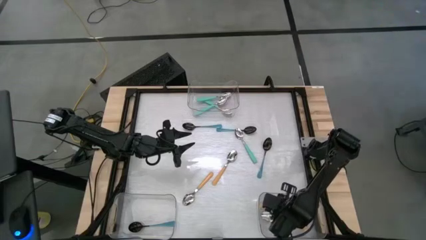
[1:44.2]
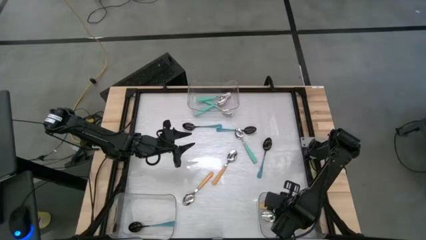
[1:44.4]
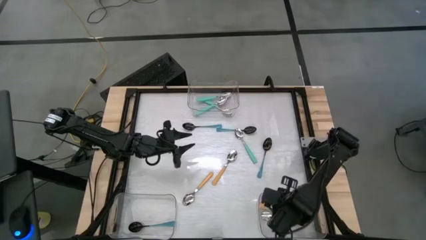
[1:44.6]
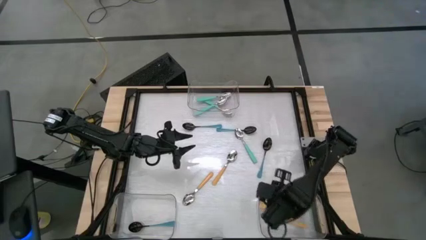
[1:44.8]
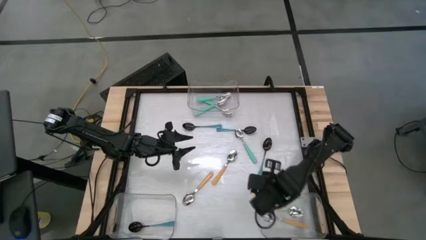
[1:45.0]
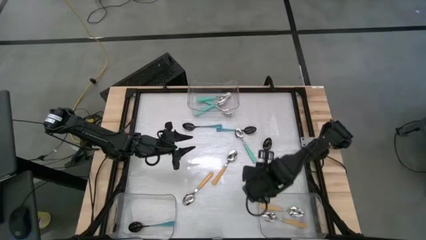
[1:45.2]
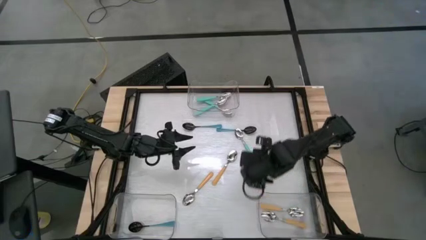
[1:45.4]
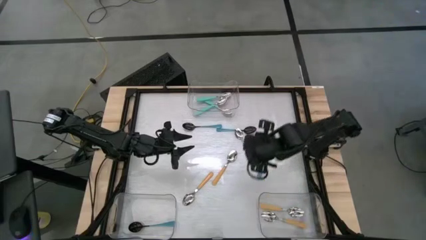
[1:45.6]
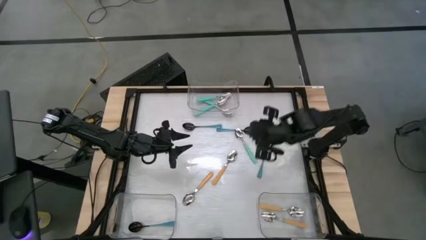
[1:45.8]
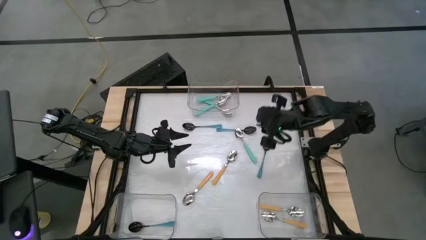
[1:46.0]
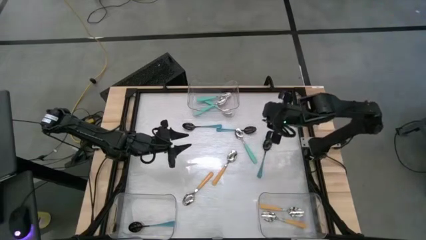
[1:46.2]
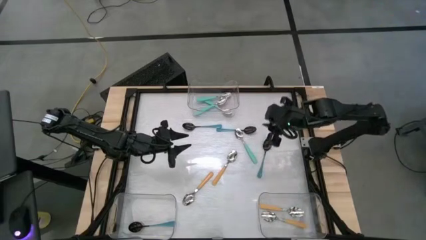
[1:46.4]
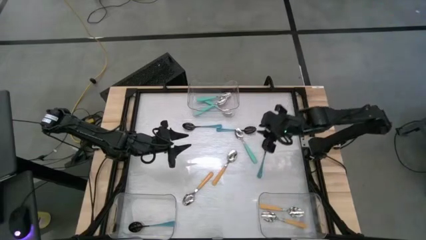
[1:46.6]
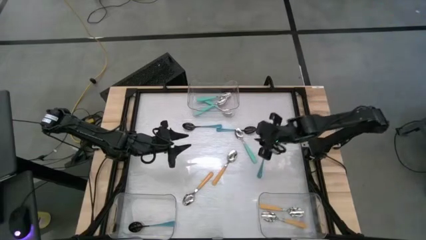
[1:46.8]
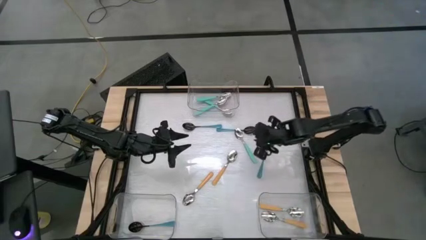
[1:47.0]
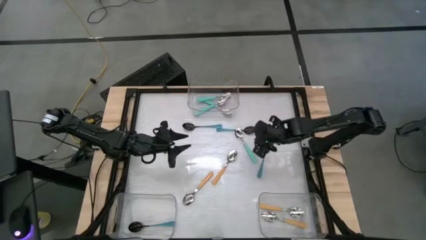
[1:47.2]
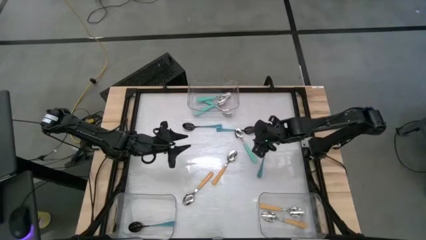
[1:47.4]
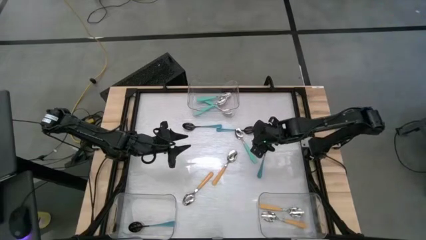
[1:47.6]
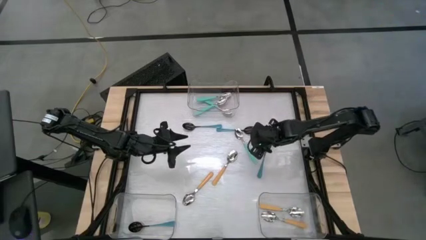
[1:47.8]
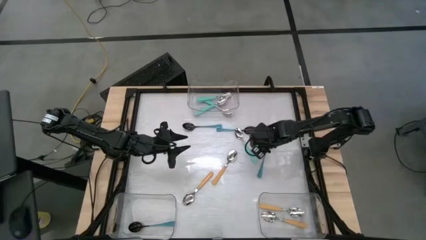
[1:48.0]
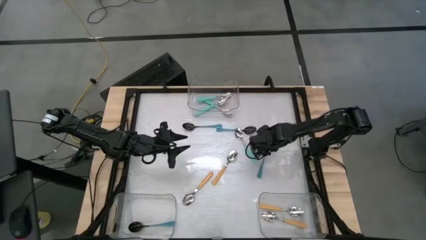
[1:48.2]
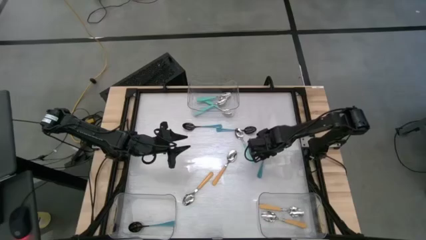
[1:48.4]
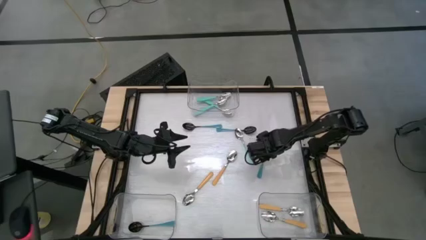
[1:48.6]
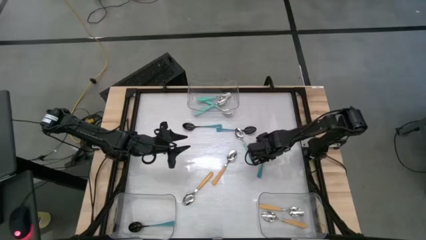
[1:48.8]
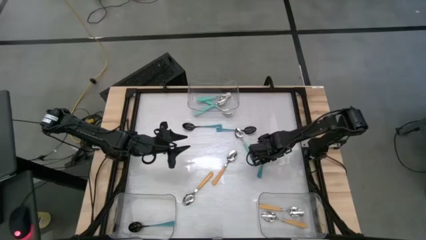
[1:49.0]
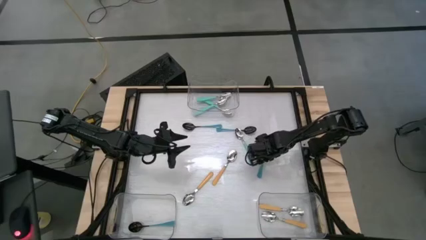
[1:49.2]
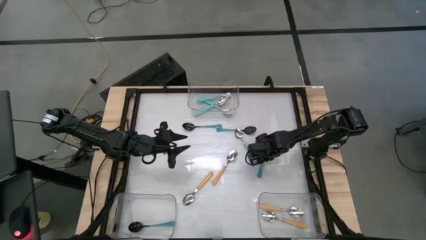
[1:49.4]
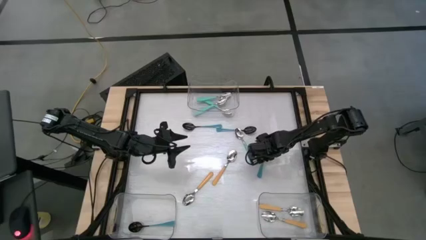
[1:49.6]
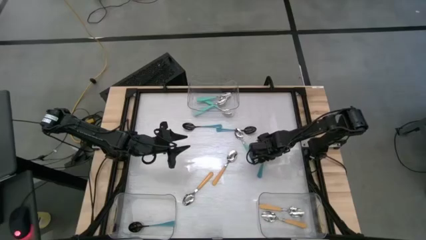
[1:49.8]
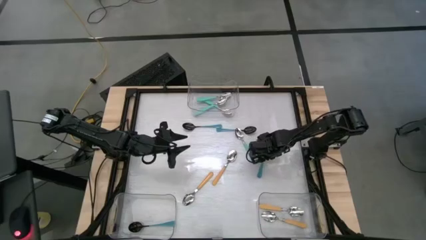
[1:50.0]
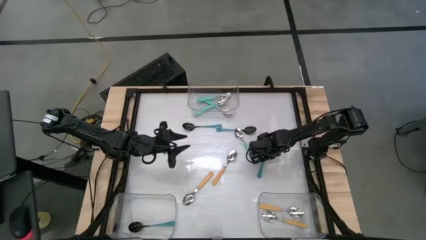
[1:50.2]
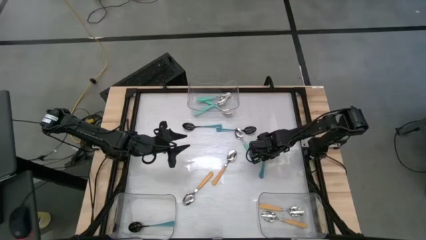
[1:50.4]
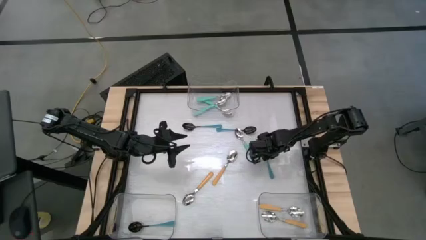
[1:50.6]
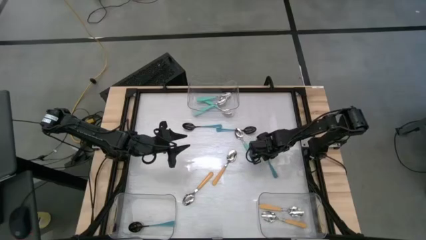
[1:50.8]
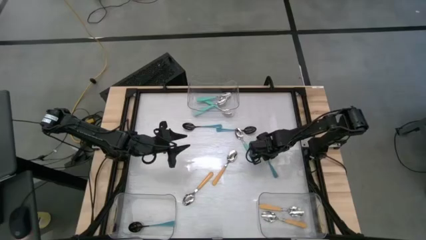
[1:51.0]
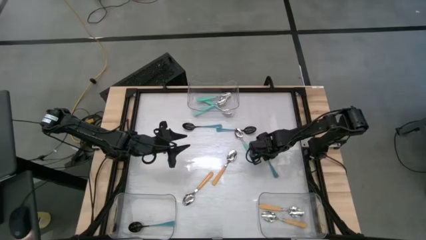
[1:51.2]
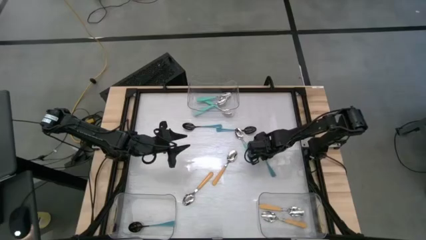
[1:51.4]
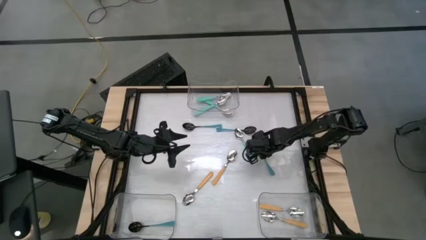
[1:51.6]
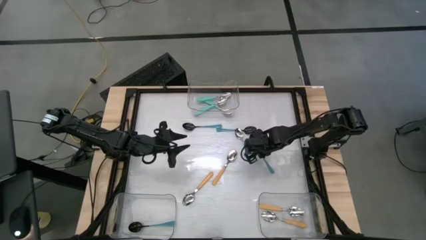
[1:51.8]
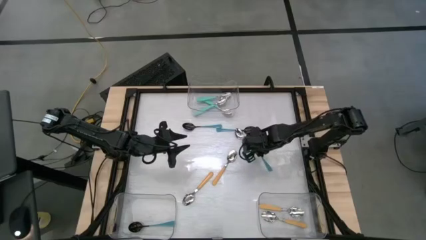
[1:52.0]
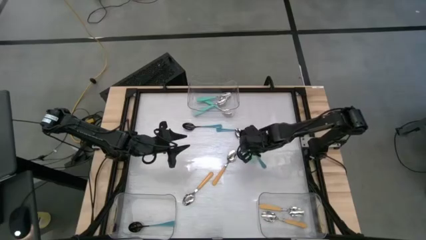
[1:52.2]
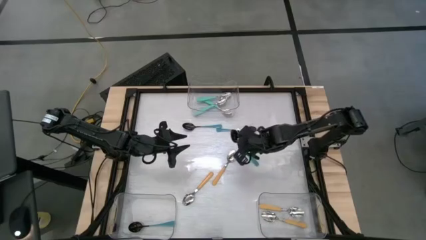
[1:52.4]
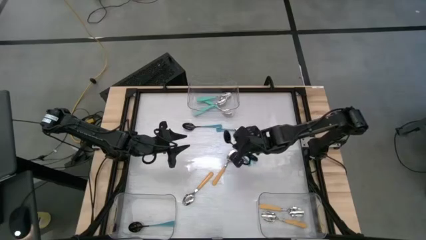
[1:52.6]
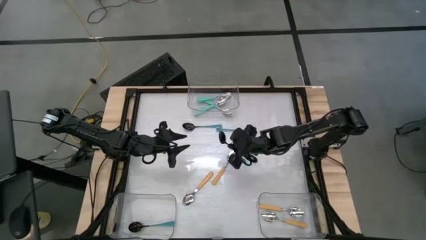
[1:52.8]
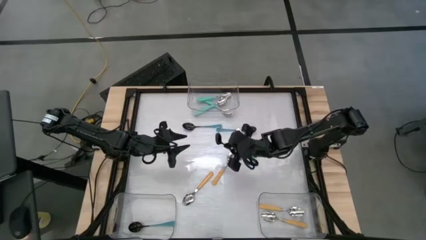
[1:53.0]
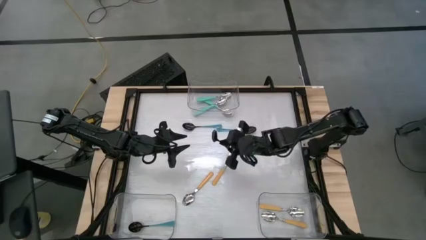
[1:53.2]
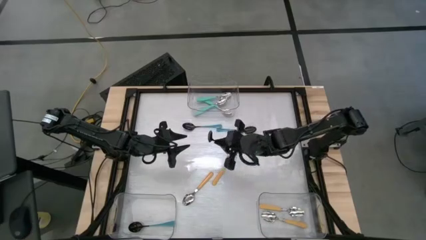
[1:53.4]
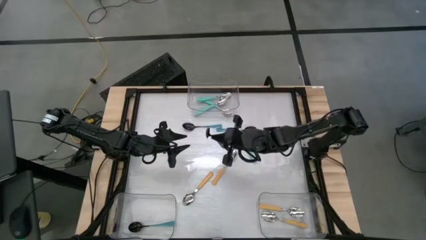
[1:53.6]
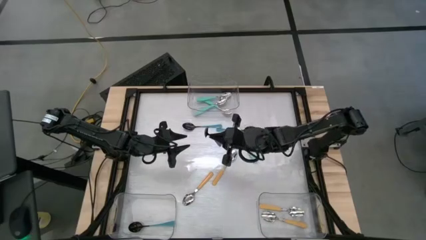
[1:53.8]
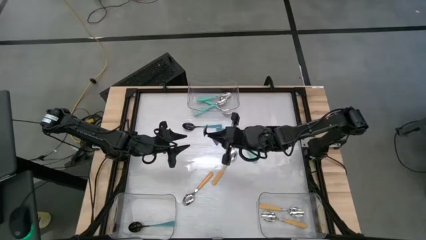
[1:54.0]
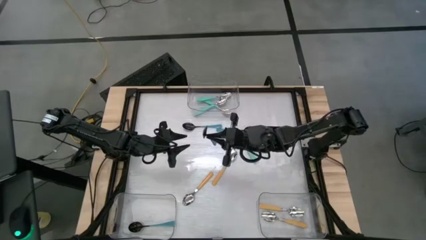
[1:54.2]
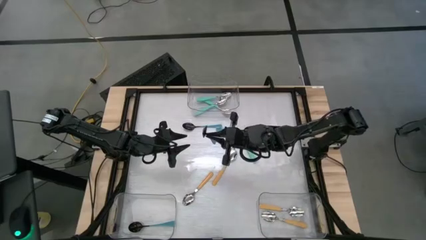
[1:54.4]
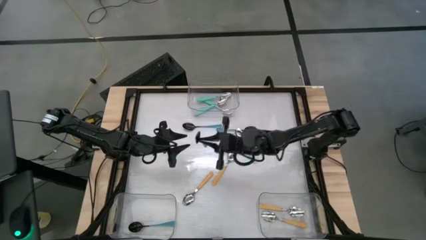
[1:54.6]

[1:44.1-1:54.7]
Task: Sort silverware by color (type)
Put the bottom black spoon into the bottom left transparent bin

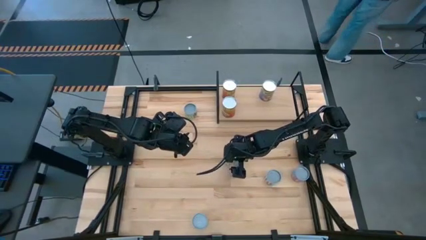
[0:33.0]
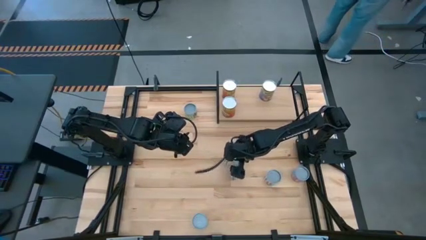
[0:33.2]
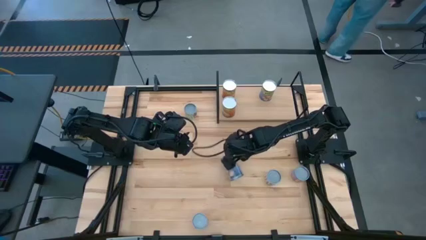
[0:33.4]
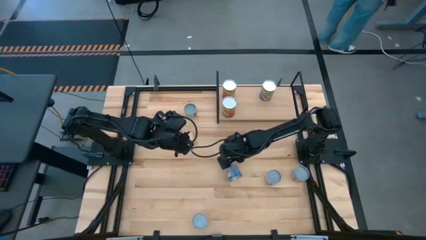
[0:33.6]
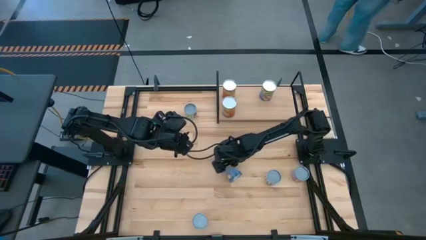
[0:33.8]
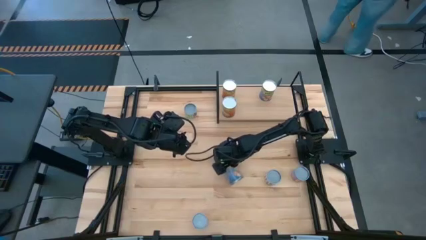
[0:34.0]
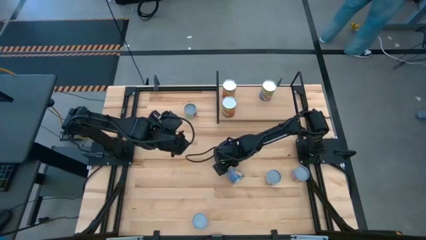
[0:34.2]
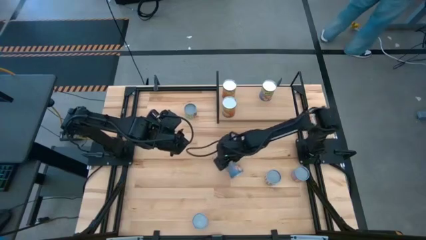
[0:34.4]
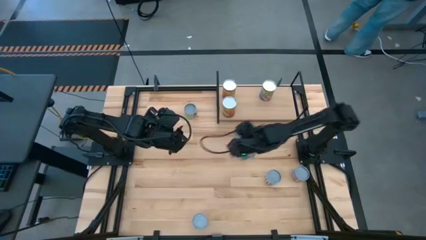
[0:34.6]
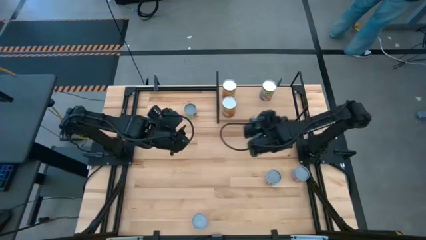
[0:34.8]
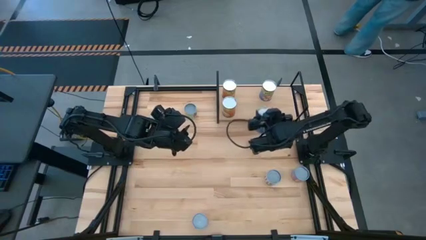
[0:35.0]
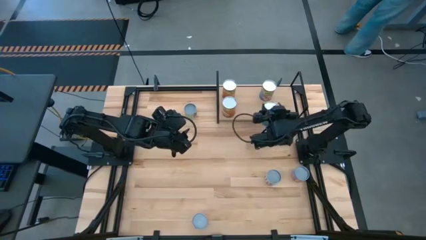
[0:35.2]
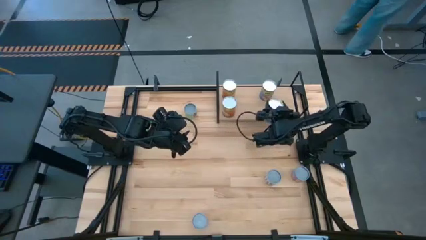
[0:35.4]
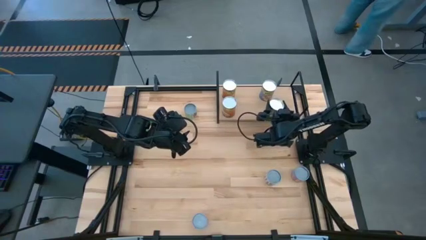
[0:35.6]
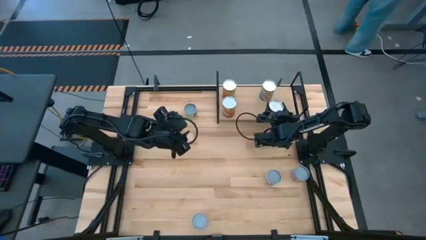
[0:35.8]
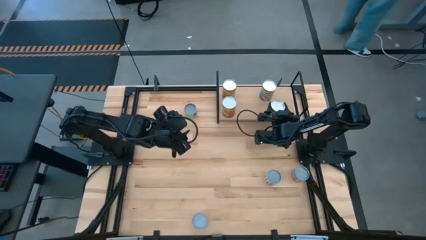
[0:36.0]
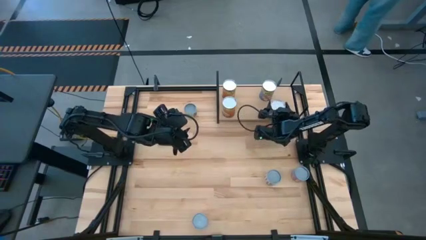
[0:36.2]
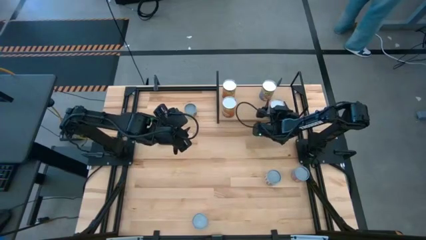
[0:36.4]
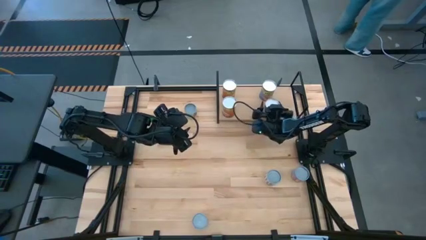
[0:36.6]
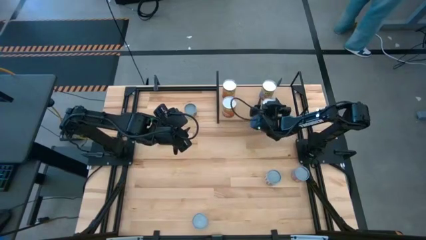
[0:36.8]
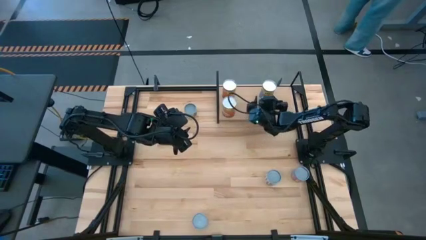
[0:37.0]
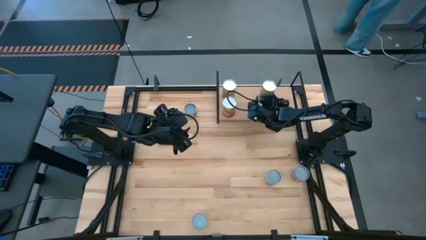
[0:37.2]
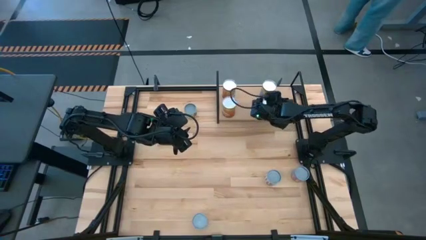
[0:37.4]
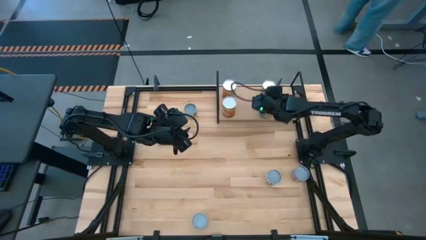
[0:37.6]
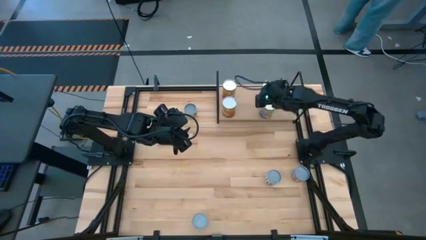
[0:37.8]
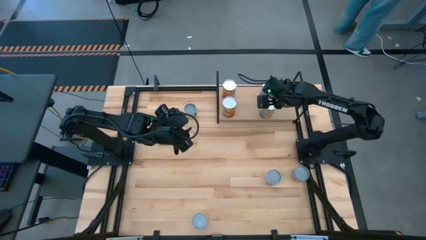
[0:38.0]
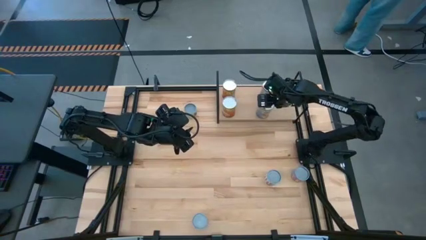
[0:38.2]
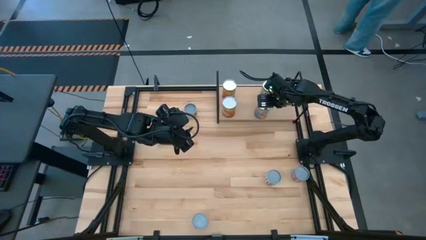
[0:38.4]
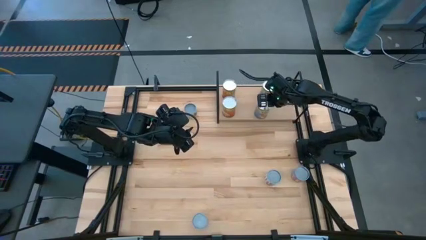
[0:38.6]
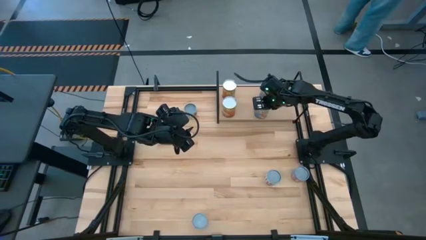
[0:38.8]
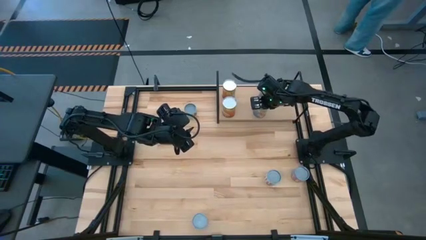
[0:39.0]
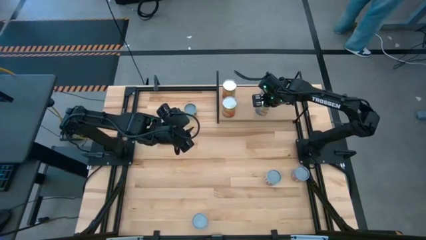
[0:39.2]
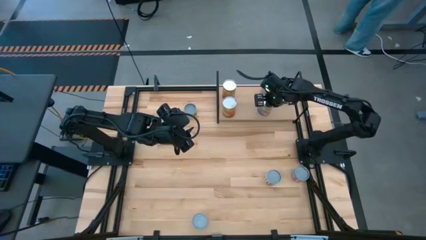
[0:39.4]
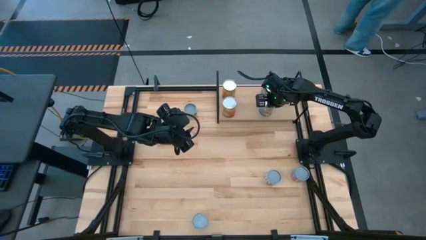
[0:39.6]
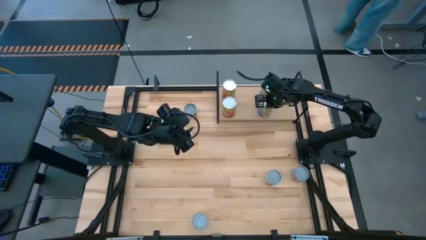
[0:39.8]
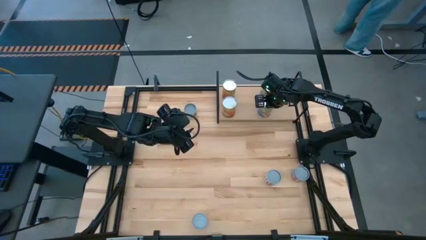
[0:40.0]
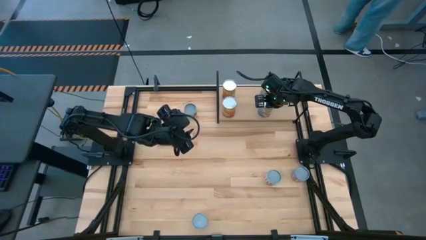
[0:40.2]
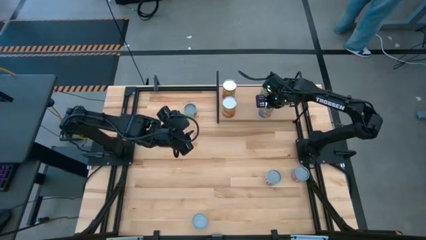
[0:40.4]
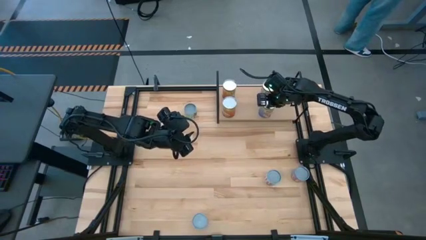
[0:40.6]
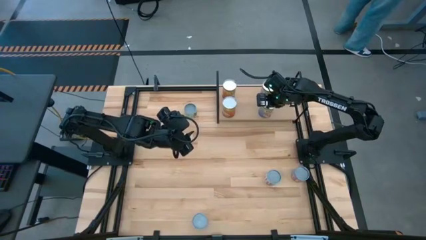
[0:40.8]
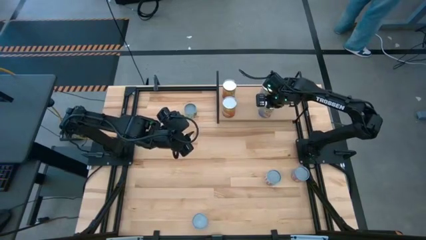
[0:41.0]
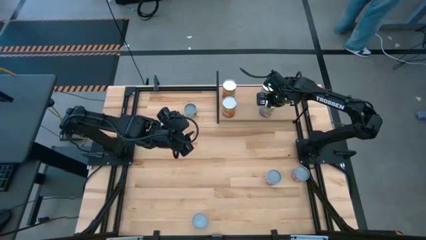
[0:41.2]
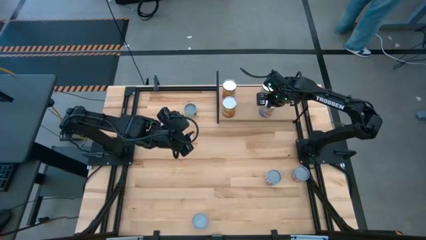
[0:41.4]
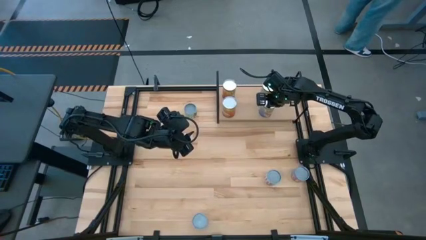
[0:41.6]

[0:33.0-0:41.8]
Task: Pick and place cans onto a shelf
Put the big blue can on the shelf aligned with the other big blue can
